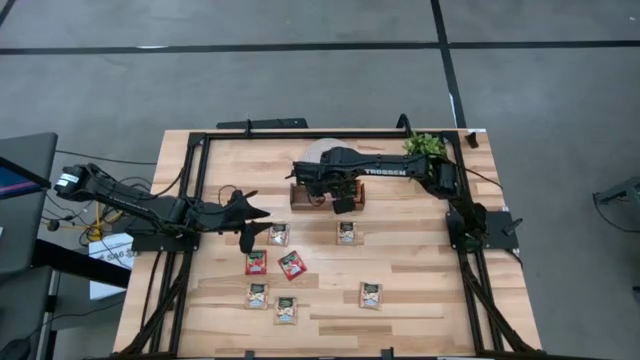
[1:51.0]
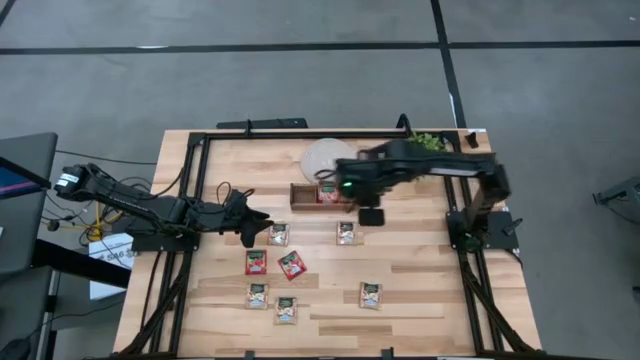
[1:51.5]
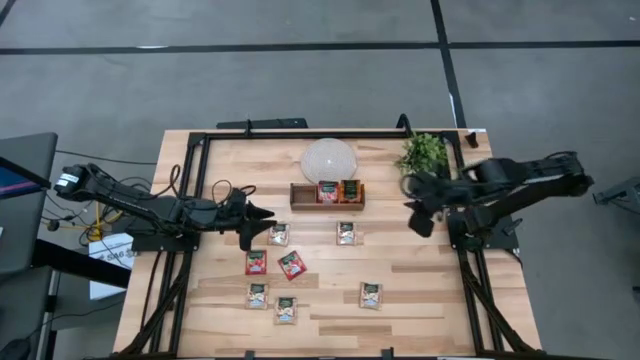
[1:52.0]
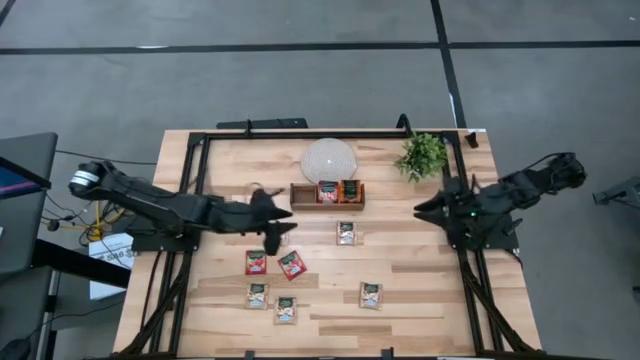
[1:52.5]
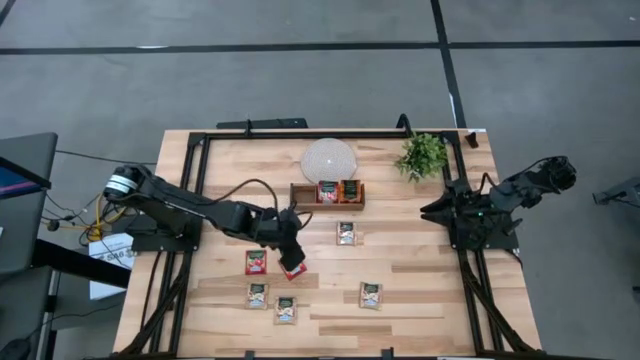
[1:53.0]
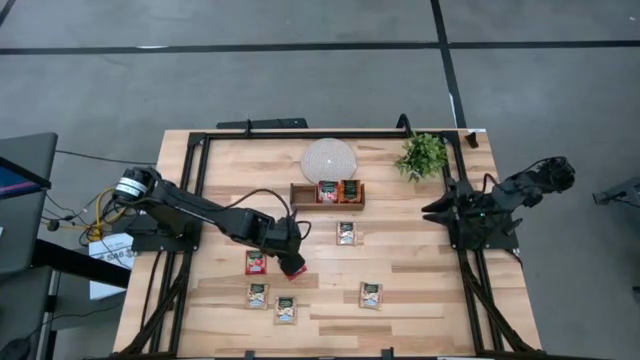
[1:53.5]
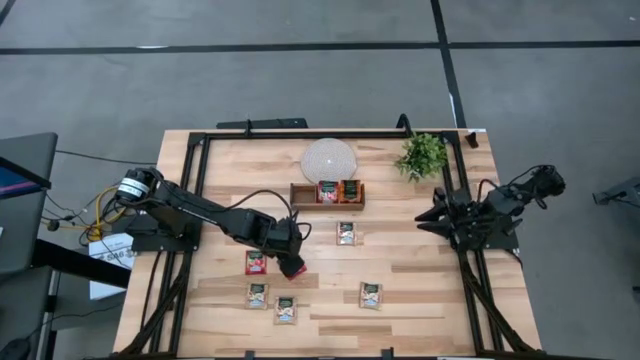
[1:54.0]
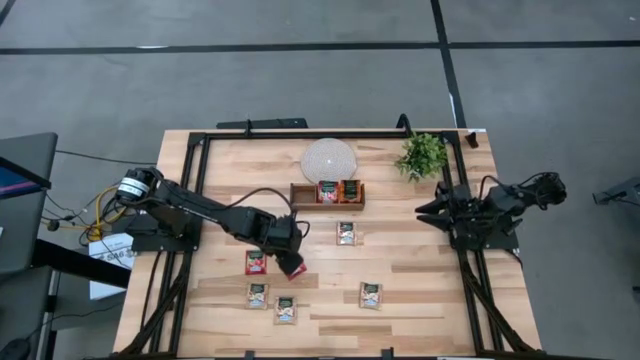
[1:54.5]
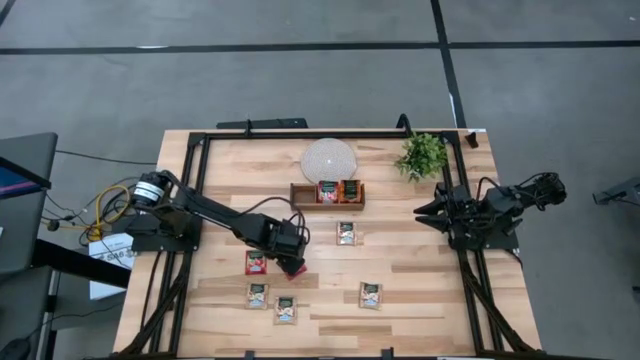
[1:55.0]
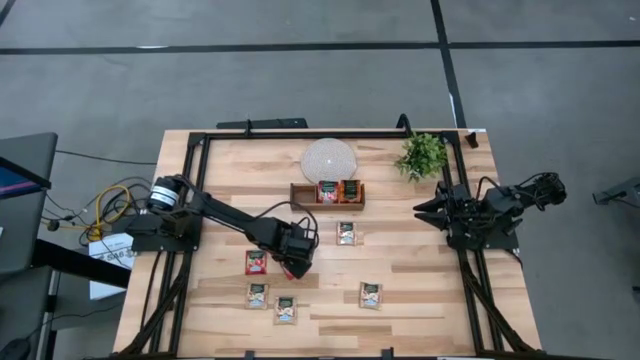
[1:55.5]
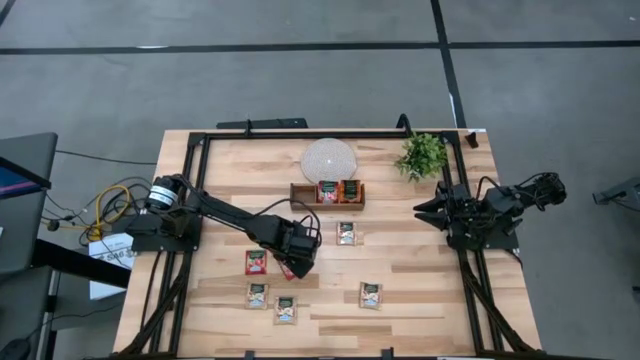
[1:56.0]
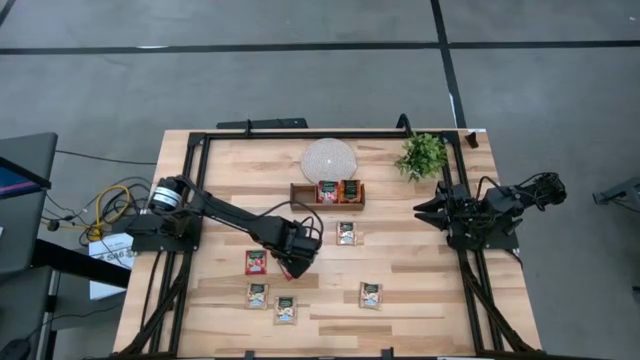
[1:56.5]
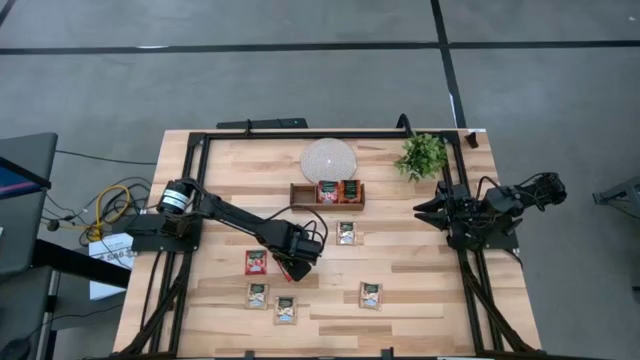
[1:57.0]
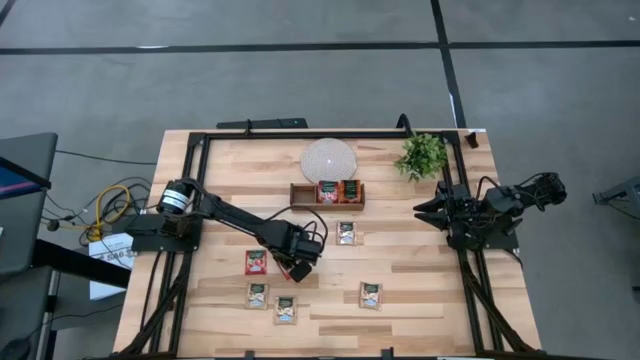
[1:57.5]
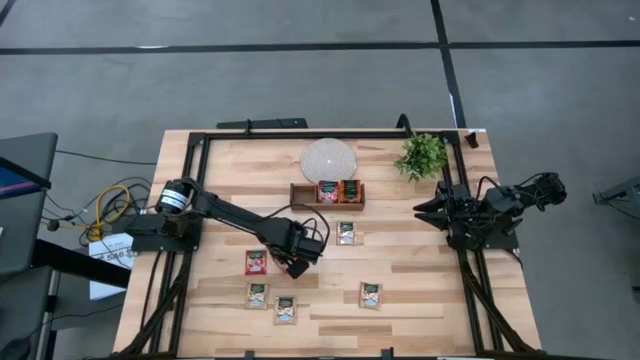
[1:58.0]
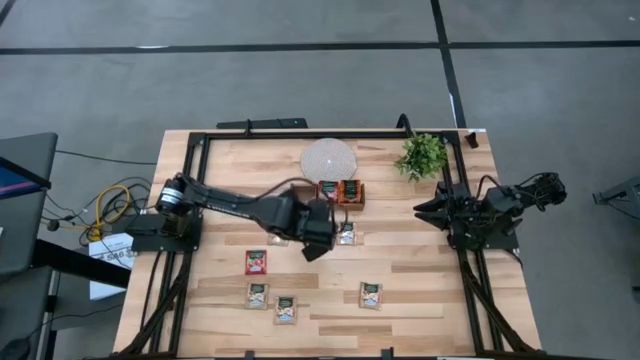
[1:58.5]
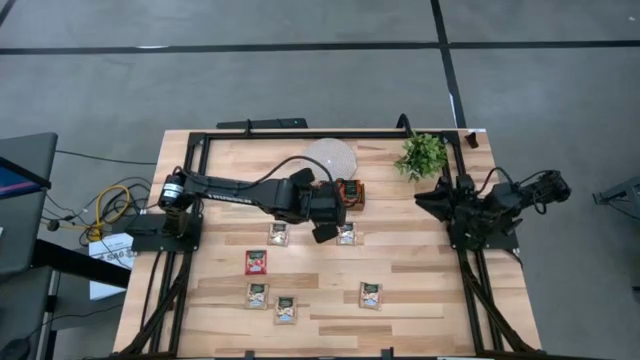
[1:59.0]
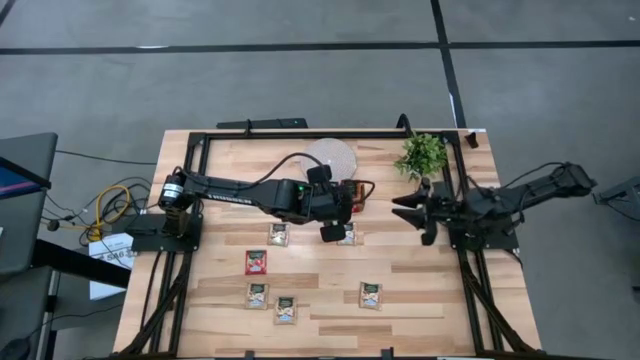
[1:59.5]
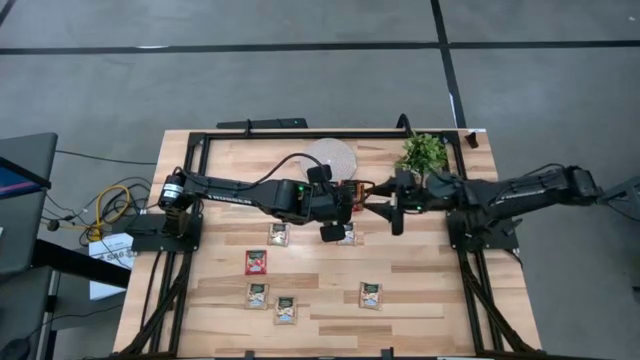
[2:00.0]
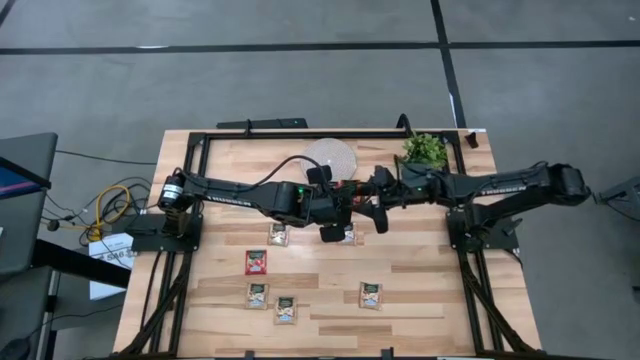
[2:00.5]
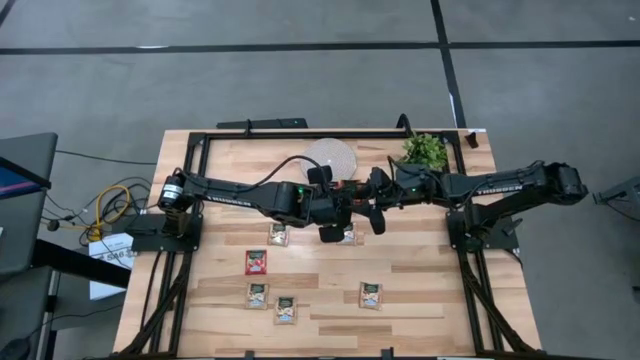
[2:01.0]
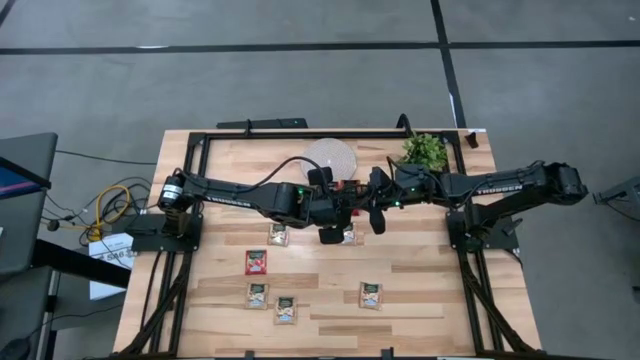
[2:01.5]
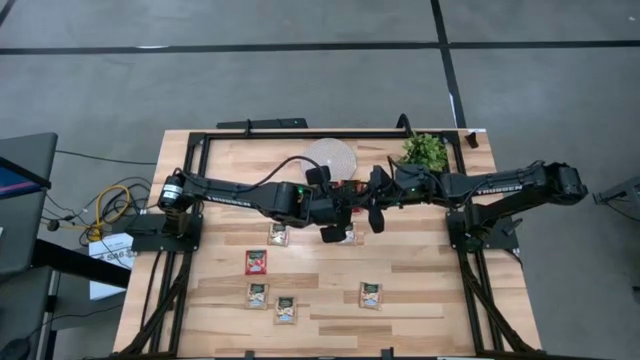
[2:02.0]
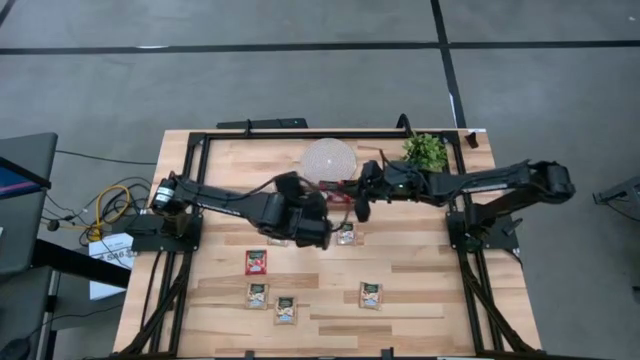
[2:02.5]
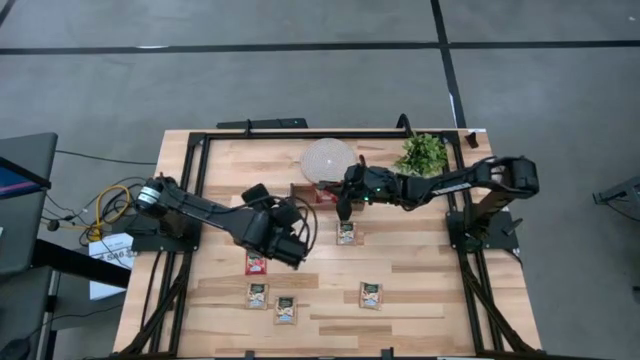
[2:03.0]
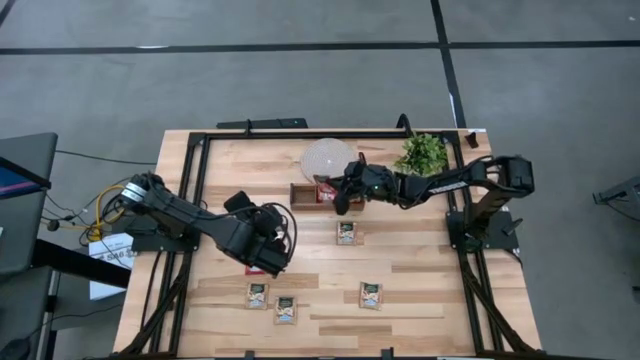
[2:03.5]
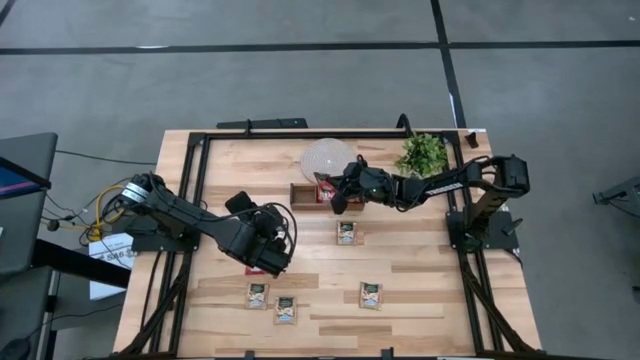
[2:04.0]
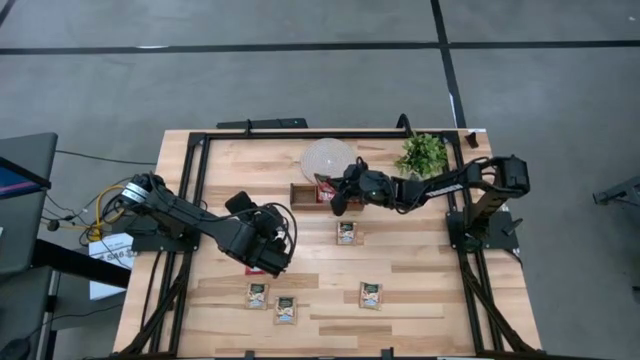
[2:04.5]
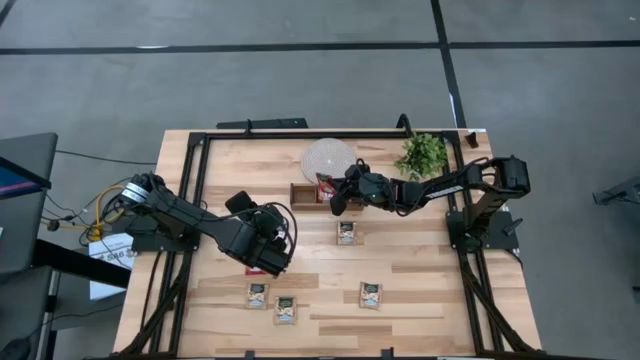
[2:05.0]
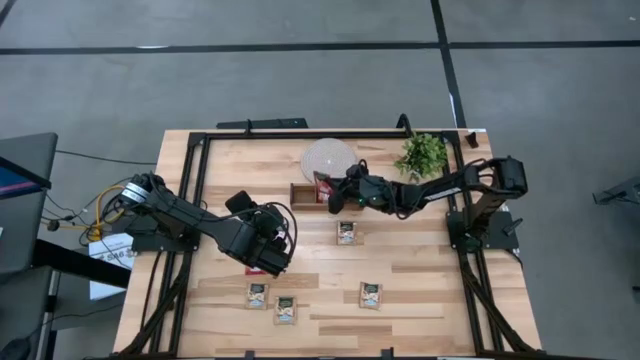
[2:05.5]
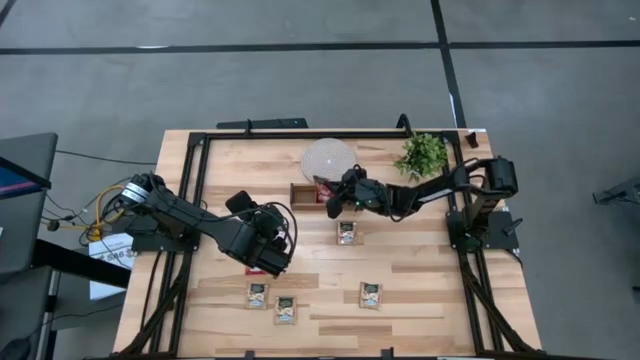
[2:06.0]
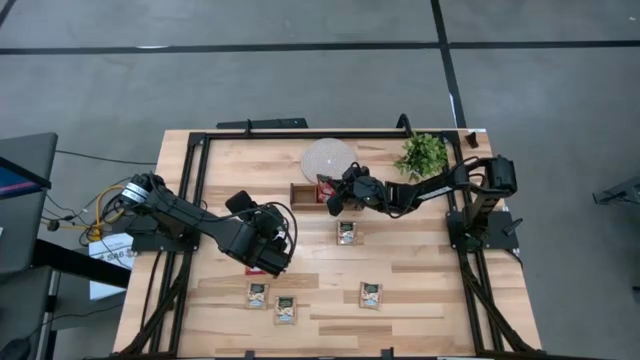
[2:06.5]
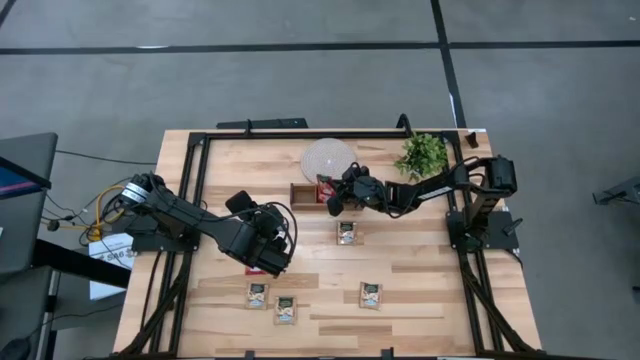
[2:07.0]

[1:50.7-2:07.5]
Task: Pick & Place Tea
Put the right red tea bag into the middle compartment of the wooden organizer

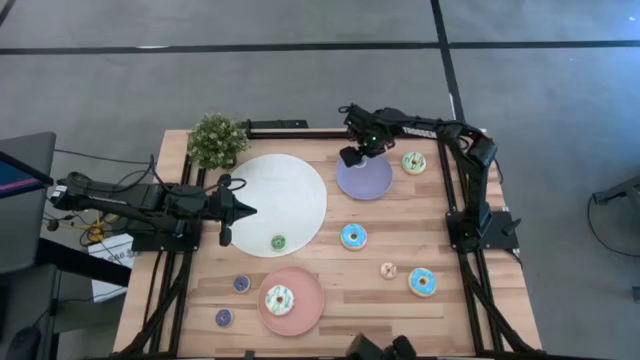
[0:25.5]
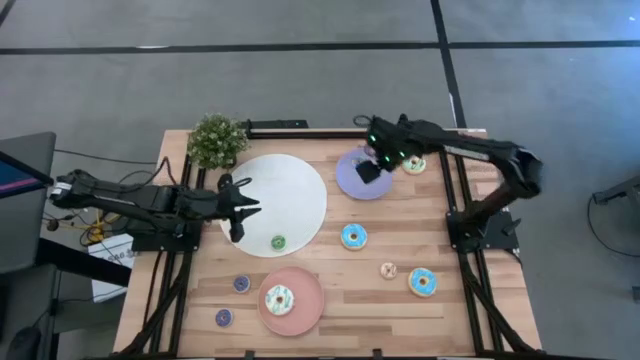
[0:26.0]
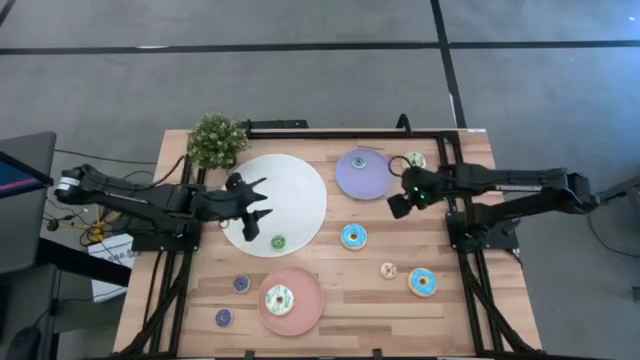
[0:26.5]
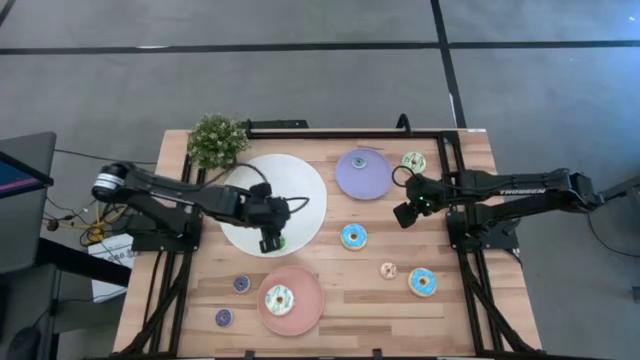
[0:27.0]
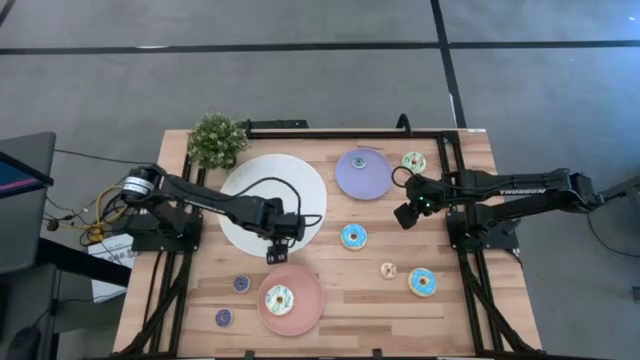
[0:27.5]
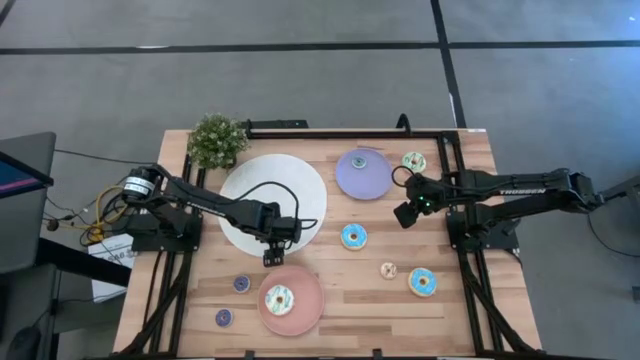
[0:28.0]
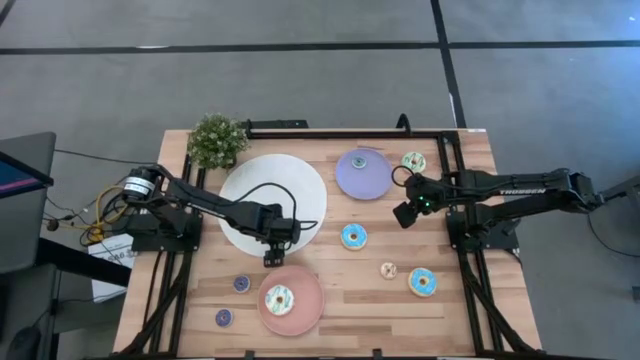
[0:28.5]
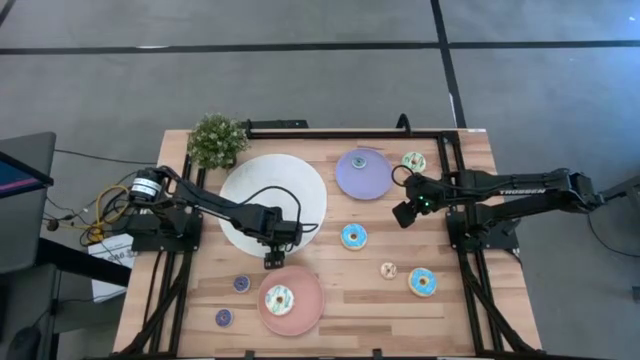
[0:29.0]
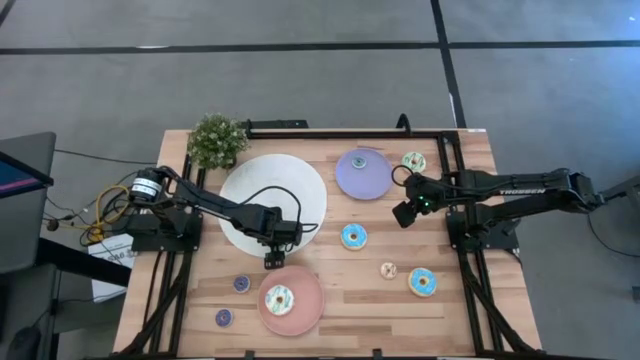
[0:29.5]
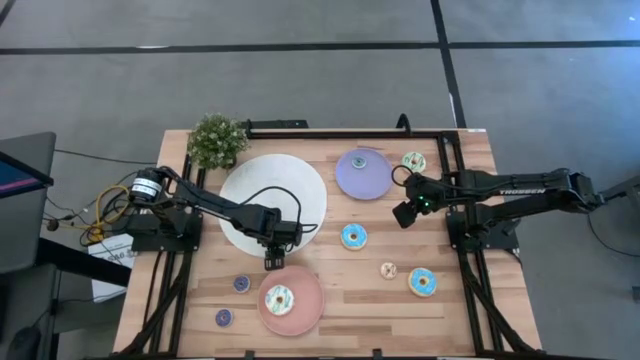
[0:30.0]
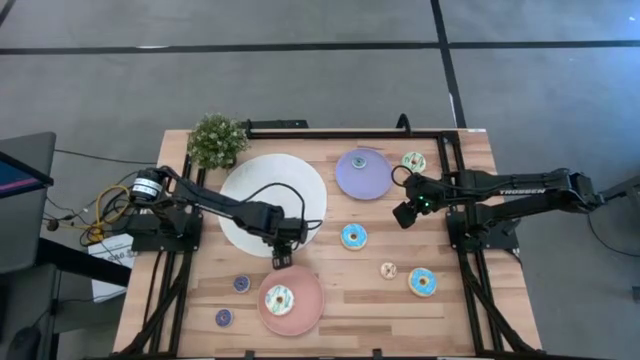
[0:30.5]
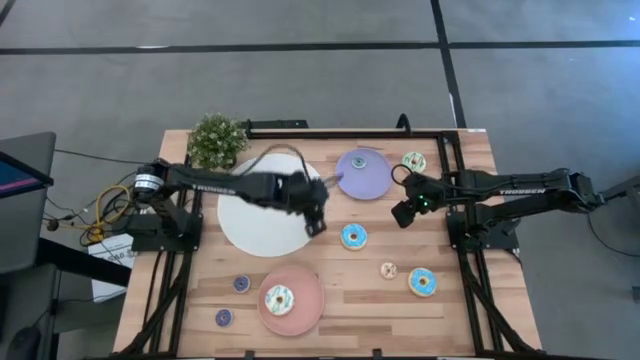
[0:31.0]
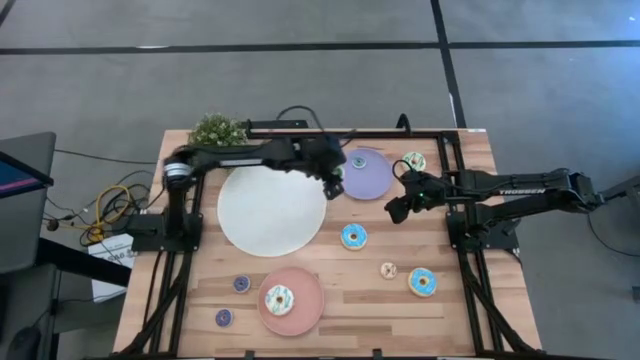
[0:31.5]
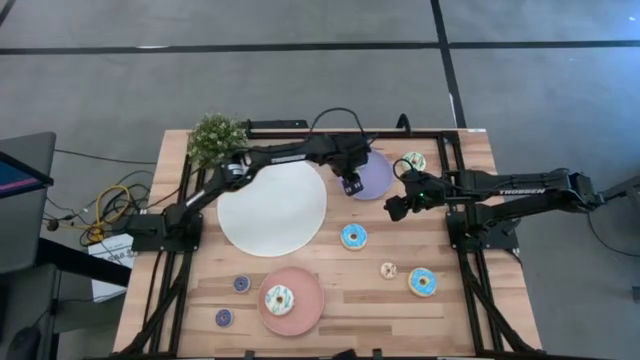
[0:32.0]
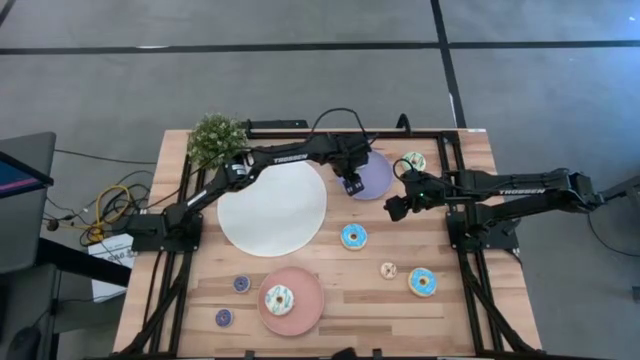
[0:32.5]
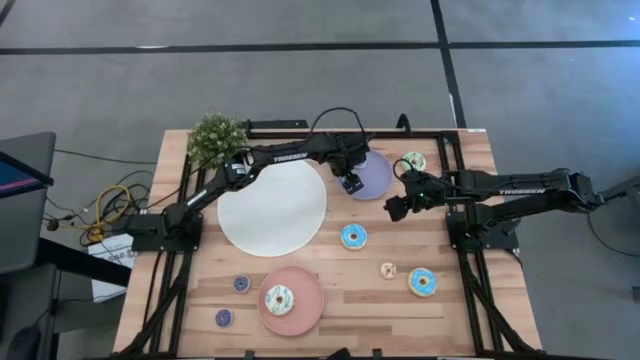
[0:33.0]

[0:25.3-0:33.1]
Task: Pick & Place donuts
Put the small green donut on the purple plate
